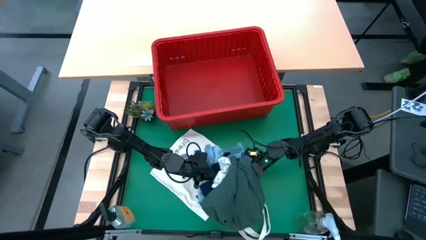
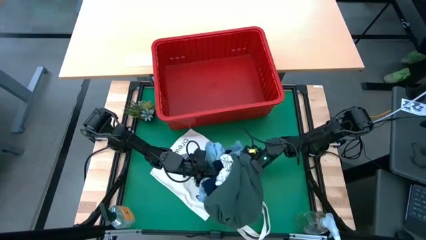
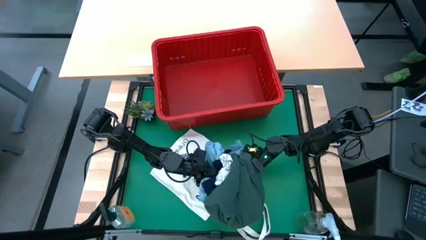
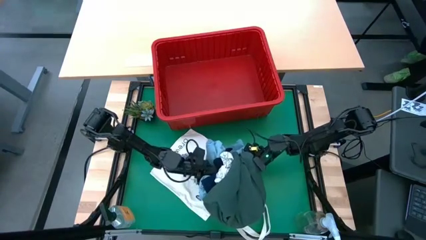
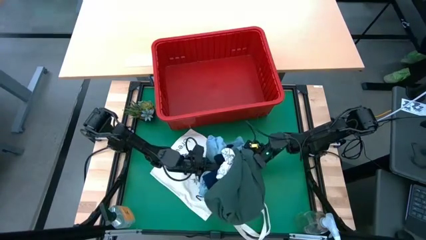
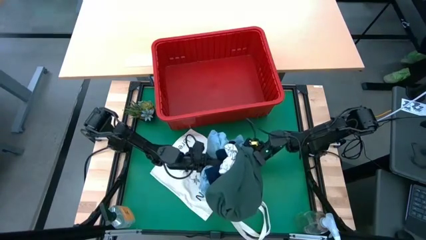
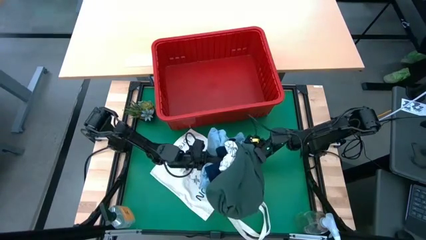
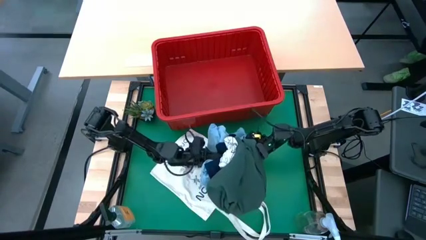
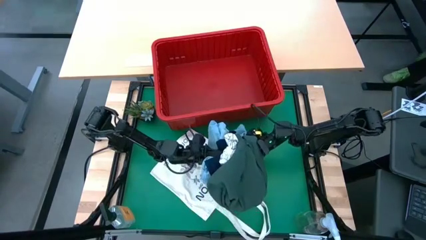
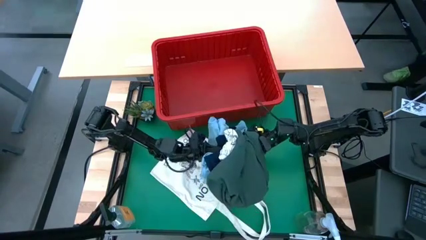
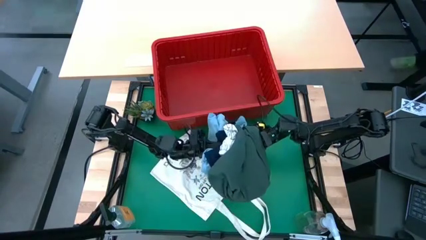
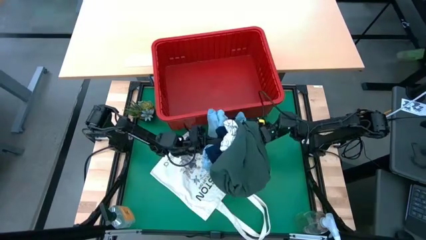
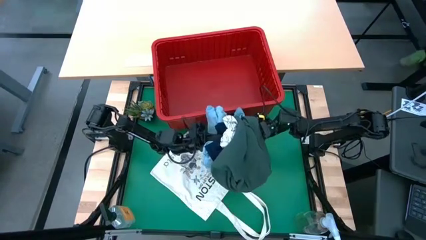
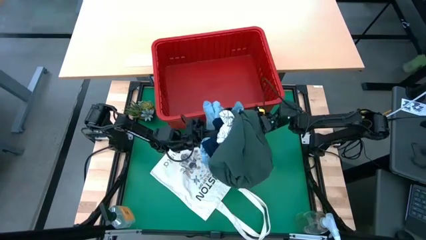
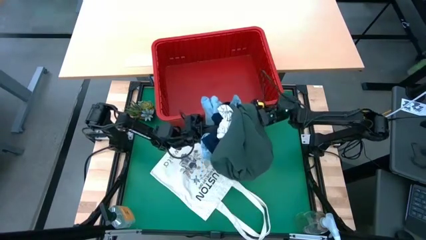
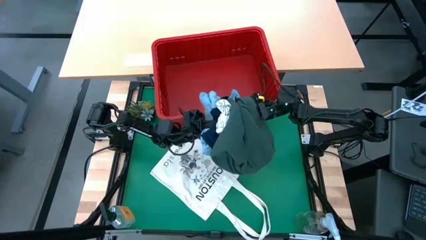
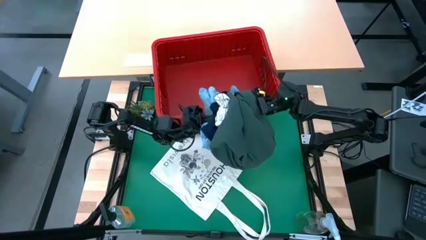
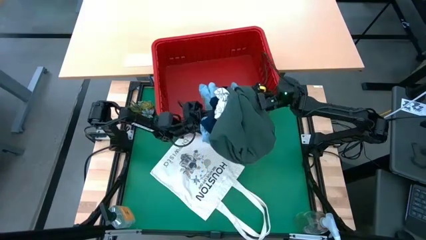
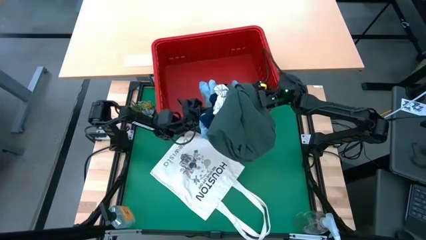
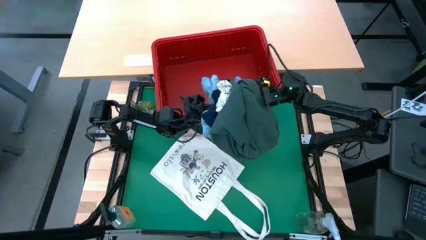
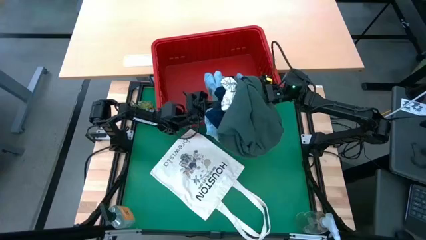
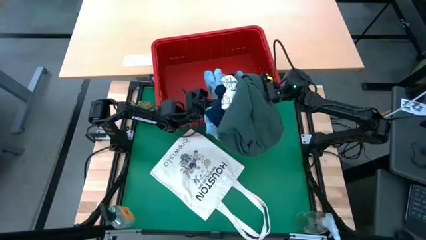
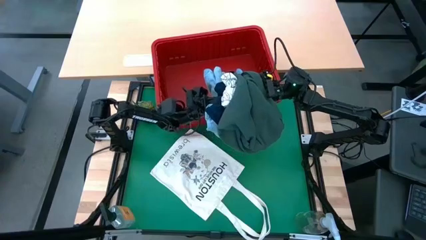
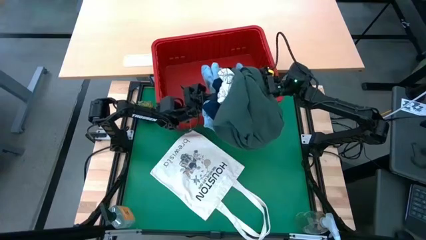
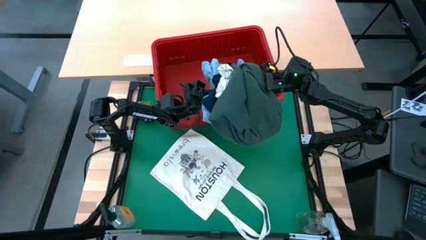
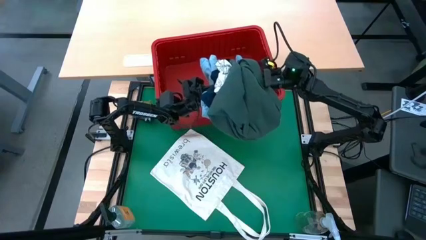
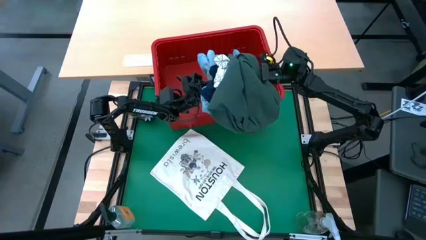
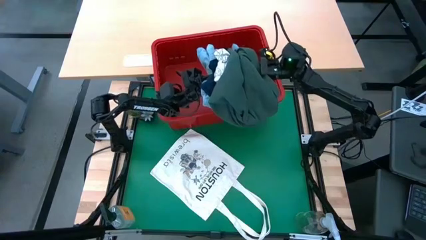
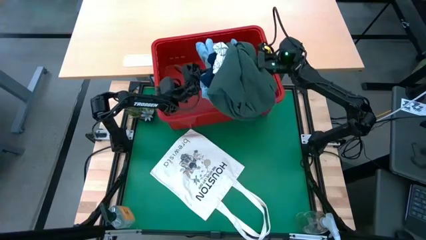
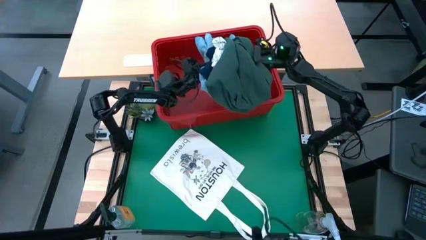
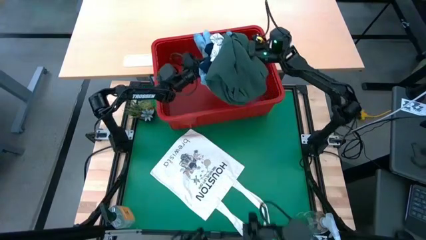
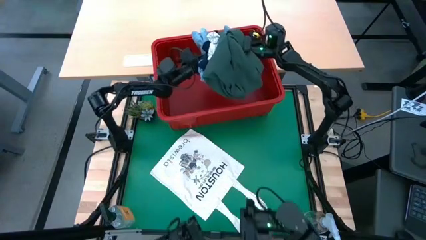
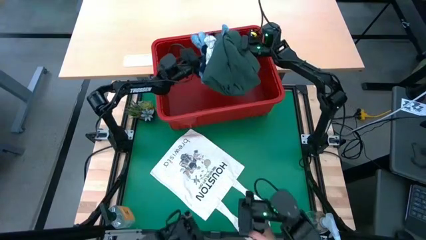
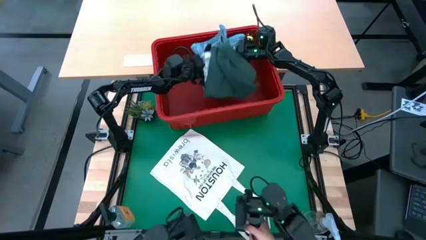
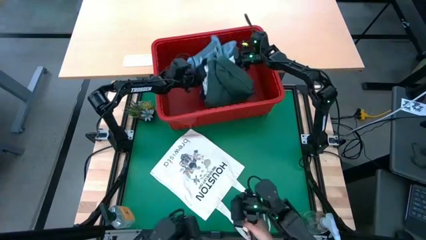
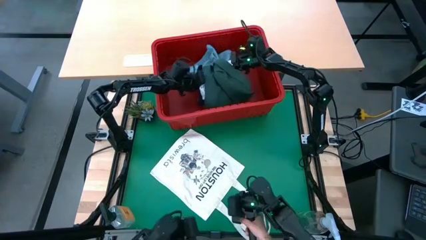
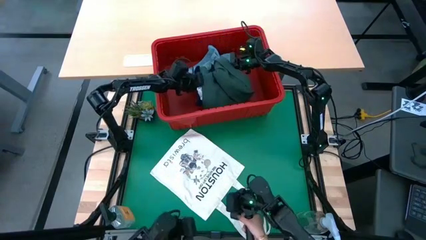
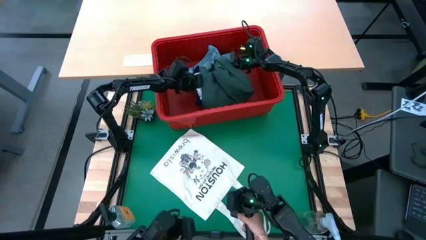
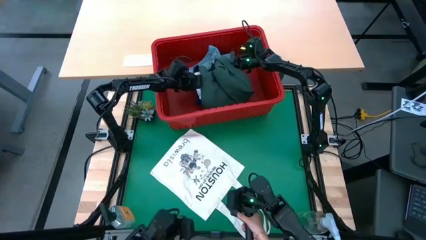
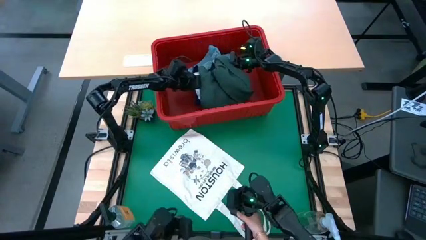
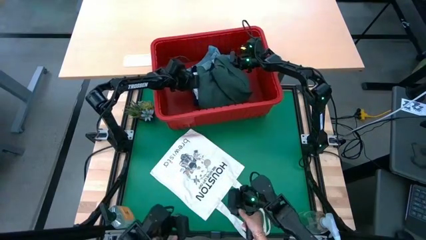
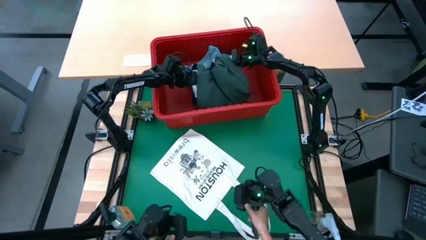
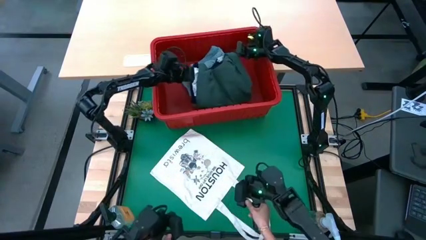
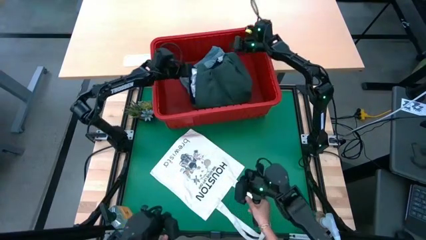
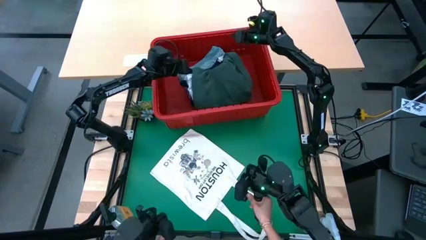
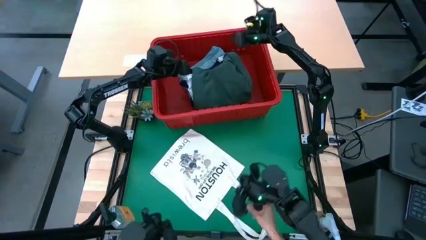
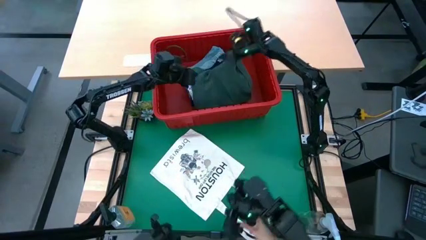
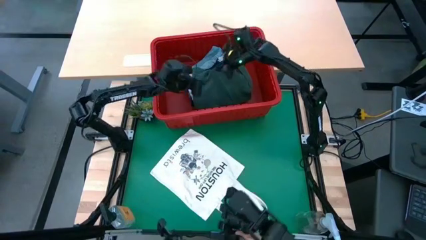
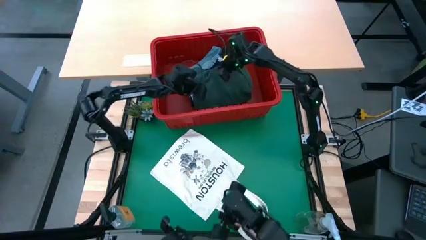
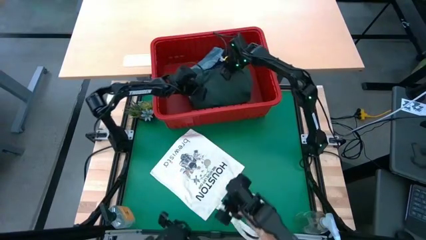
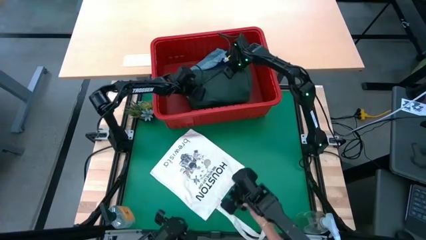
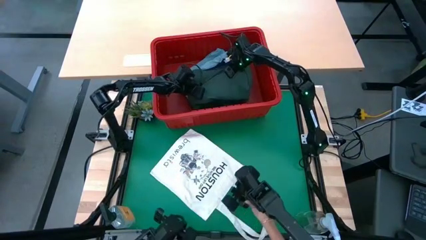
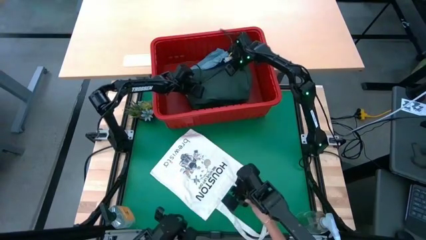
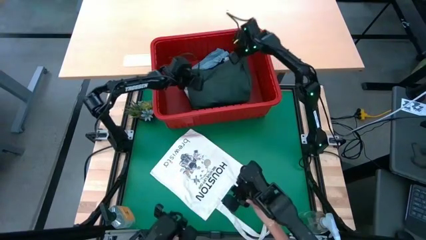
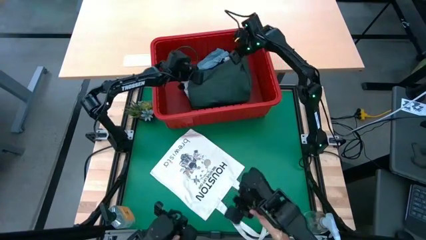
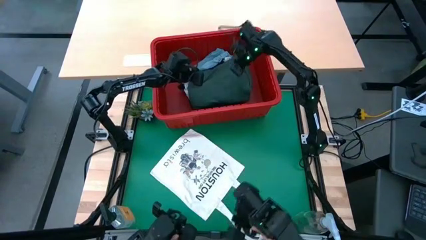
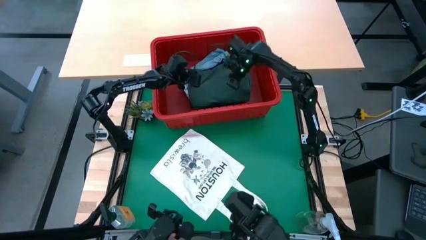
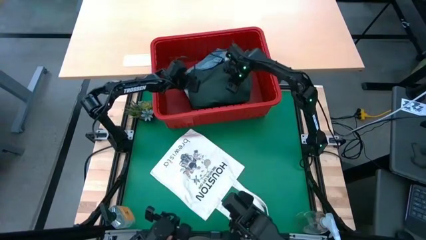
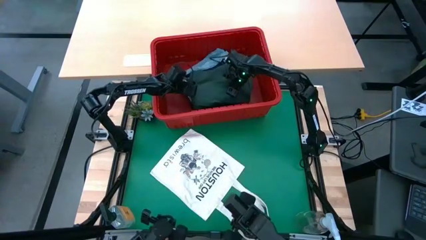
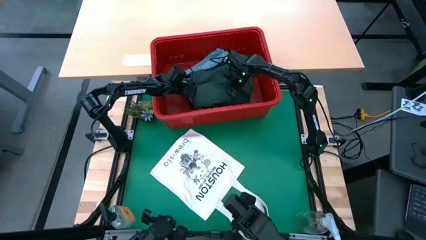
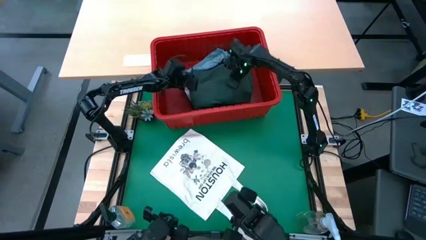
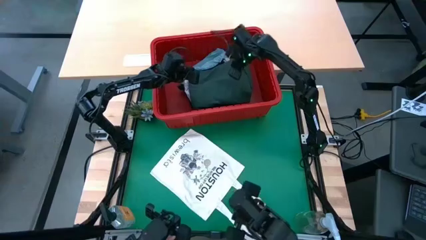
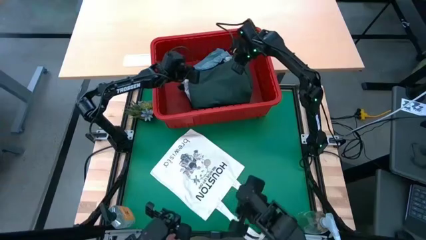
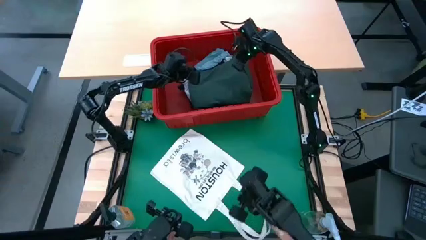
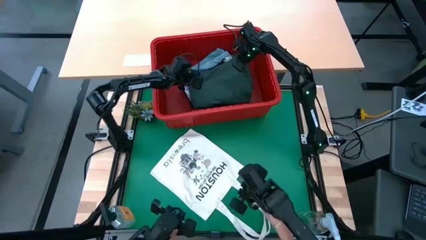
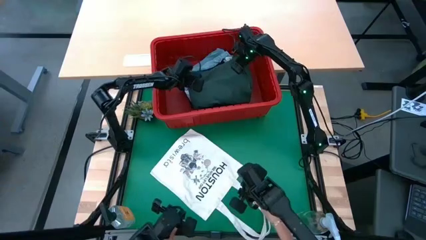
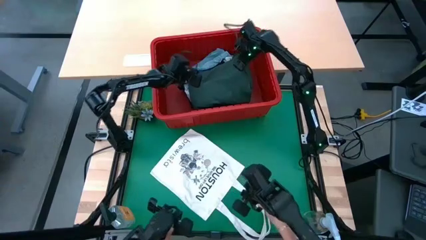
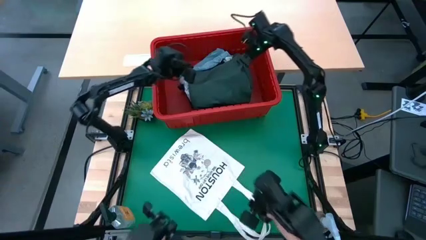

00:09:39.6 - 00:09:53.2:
Task: Fold laundry
Put the clothes into the red bin
